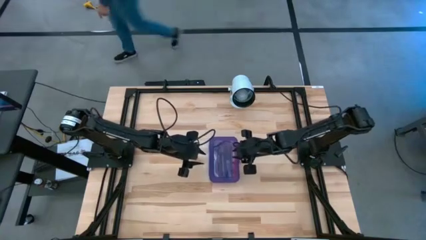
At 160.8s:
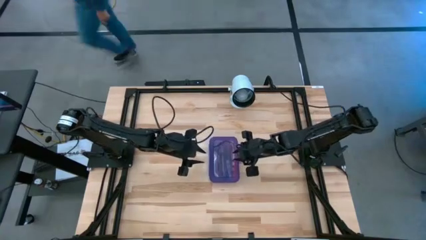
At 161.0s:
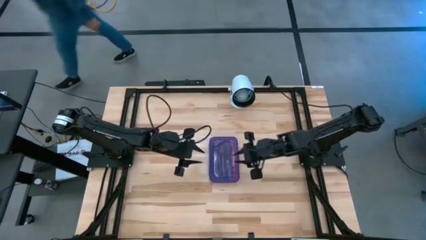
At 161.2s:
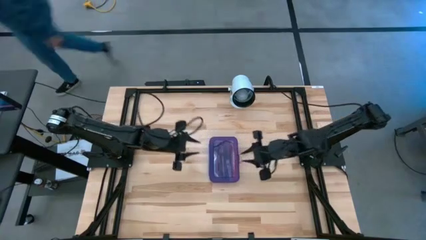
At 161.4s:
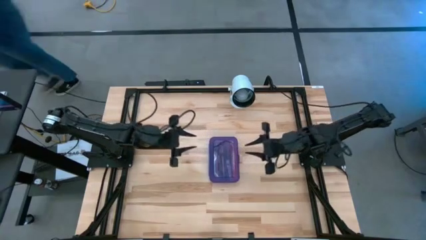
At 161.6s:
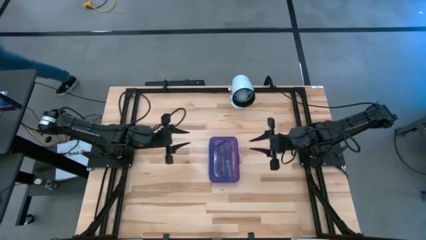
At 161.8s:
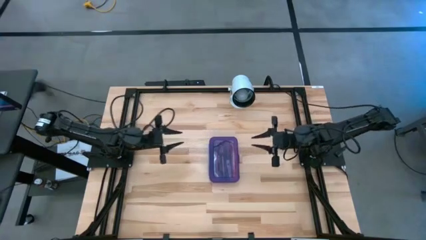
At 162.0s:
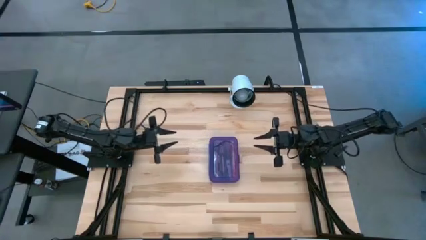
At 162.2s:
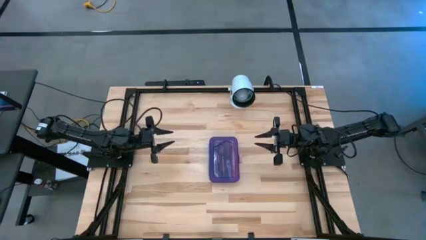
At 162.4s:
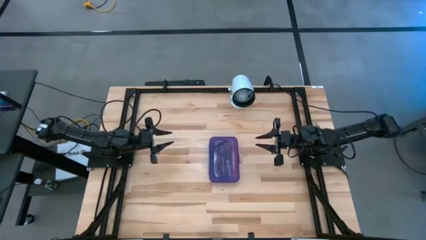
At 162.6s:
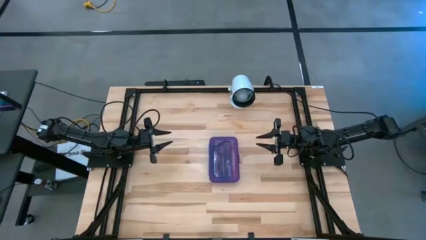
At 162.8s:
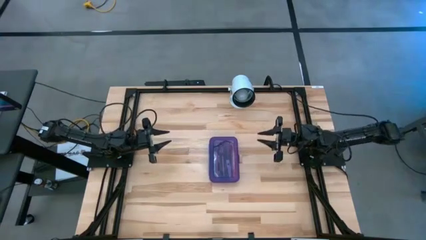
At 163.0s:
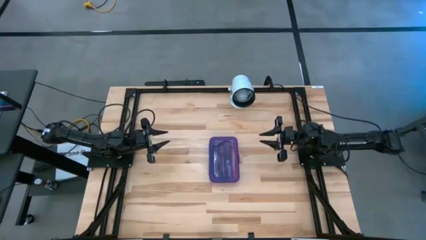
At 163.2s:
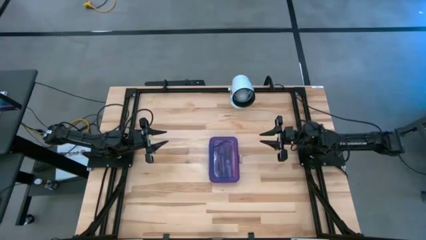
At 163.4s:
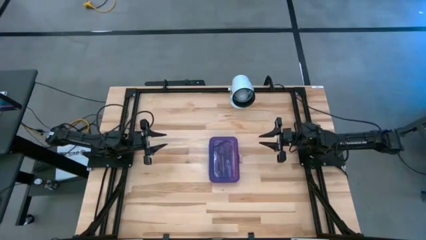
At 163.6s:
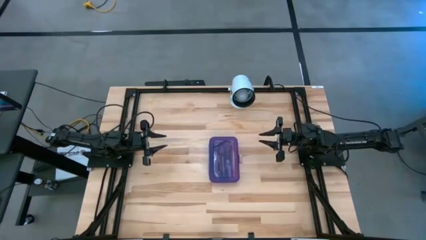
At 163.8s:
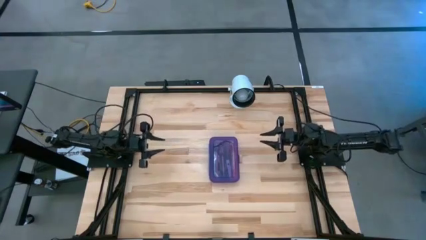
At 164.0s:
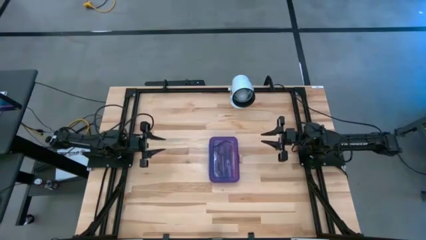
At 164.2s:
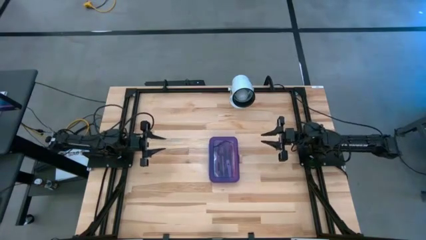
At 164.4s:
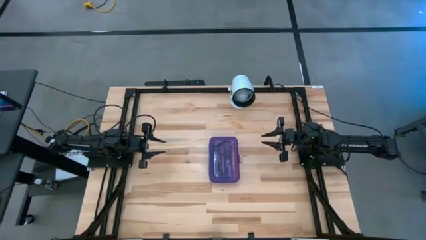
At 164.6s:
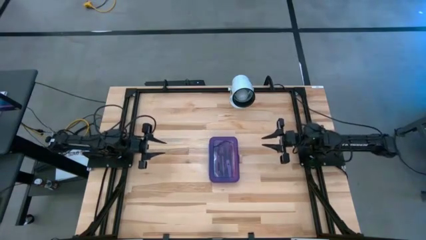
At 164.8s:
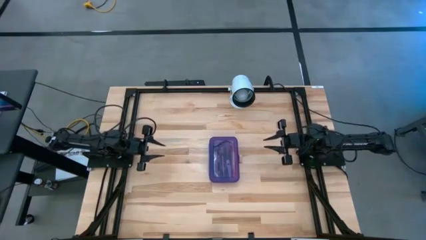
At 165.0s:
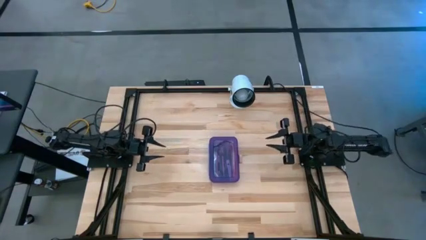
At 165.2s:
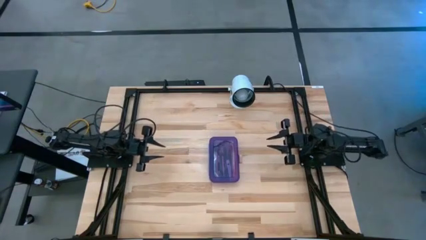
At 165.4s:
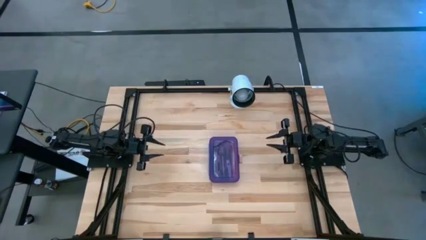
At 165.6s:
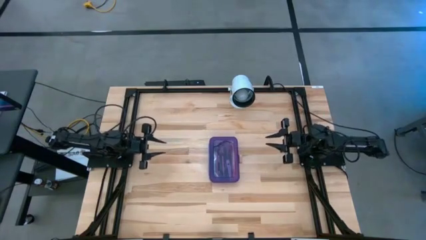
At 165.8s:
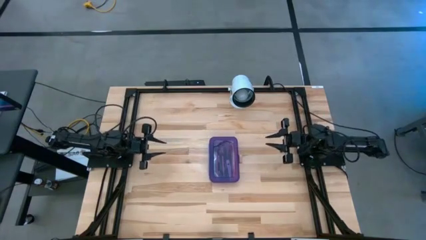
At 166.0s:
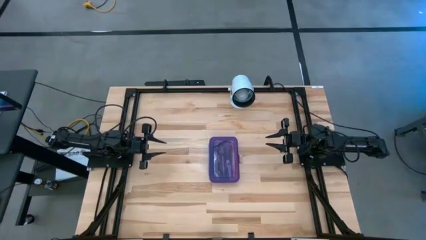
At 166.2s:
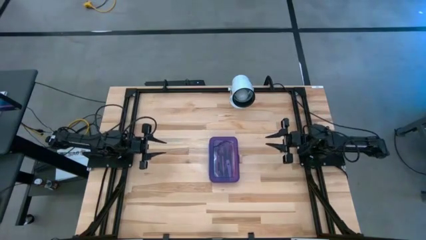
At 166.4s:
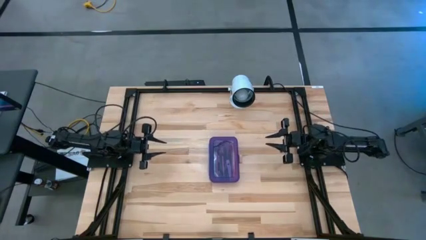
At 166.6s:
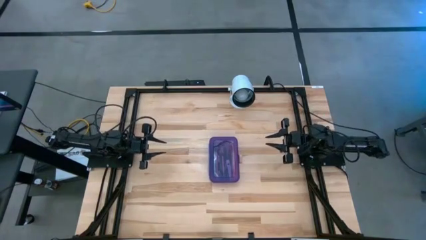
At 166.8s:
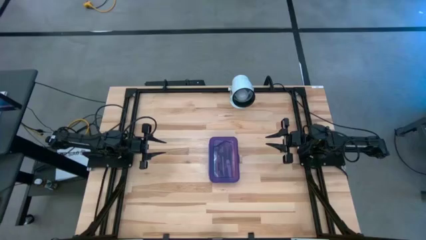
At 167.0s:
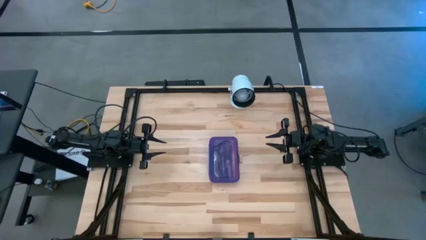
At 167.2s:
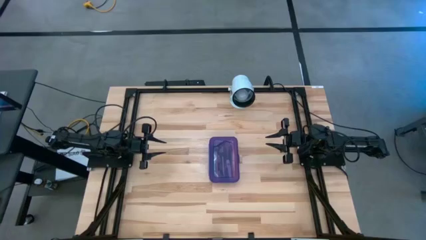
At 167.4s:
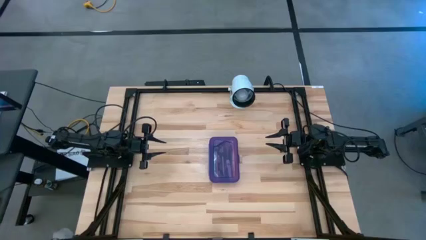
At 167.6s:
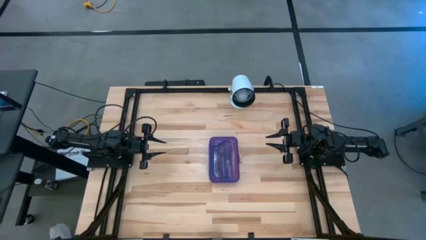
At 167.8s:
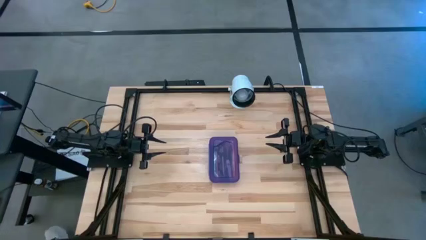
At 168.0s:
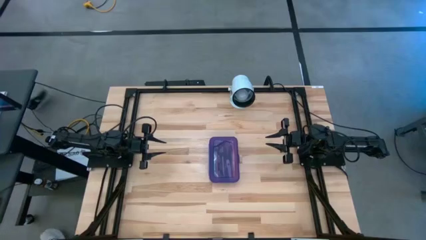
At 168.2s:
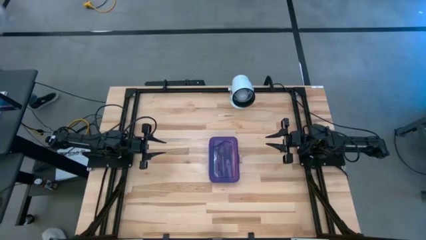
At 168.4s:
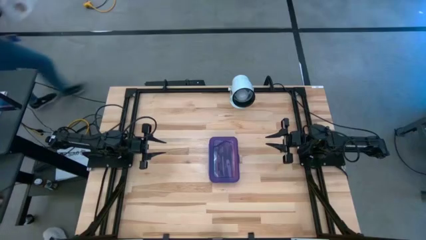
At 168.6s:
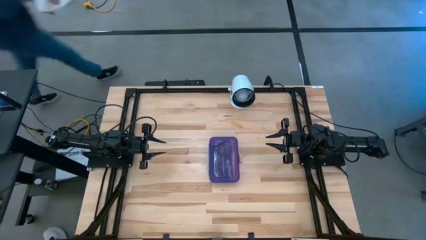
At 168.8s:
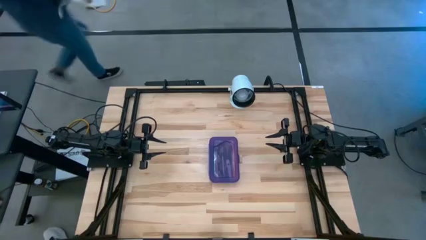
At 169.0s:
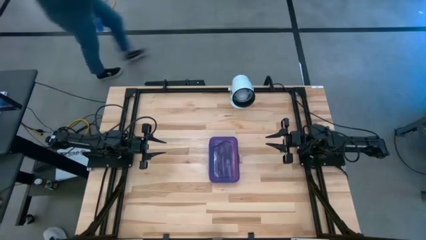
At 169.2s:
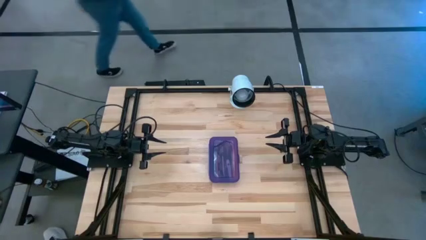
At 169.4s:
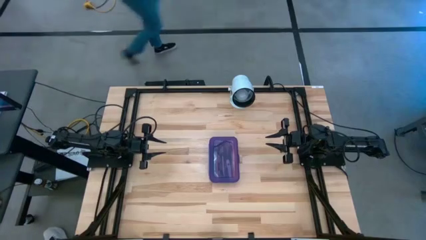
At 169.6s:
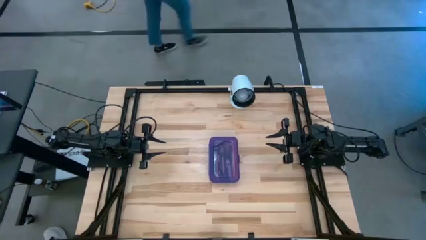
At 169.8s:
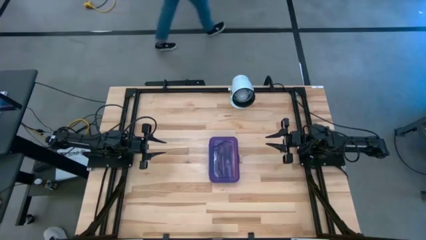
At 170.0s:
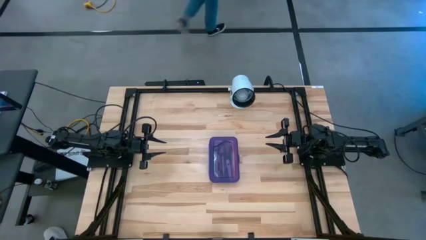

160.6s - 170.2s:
Task: Pick & place school supplies into a supply box
Return to Home Position

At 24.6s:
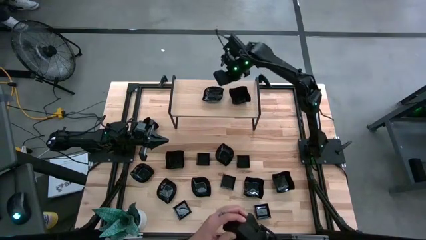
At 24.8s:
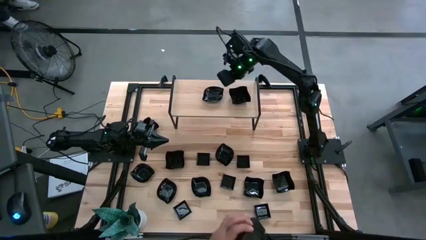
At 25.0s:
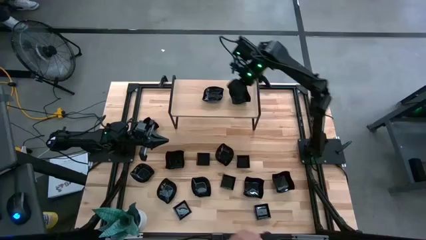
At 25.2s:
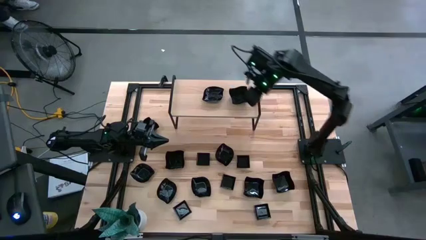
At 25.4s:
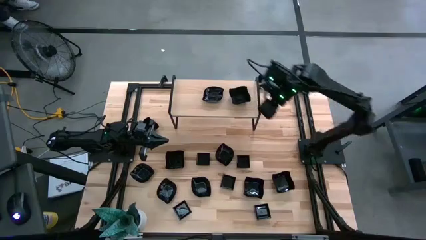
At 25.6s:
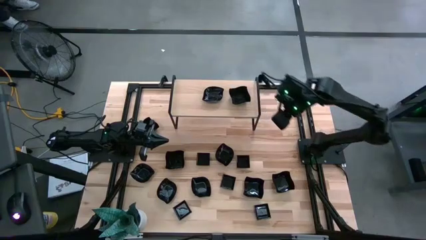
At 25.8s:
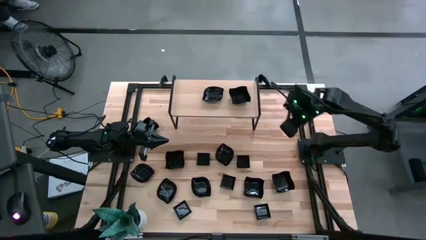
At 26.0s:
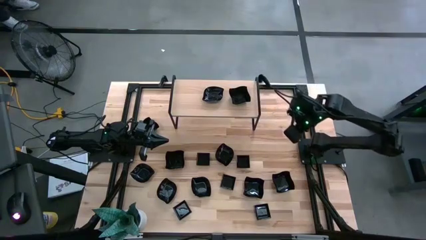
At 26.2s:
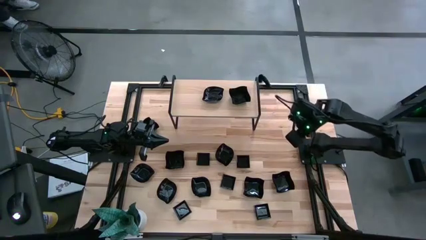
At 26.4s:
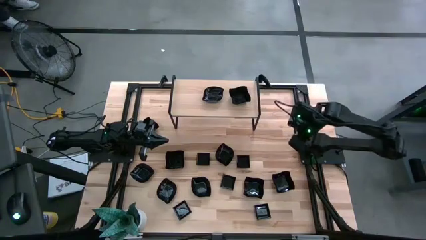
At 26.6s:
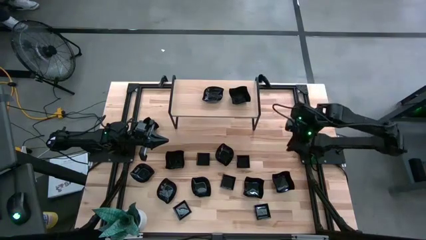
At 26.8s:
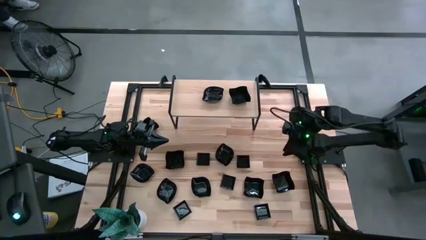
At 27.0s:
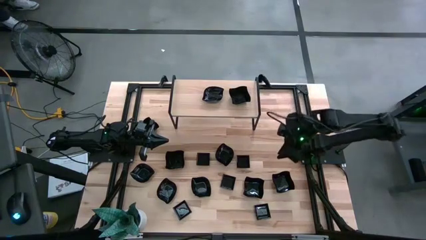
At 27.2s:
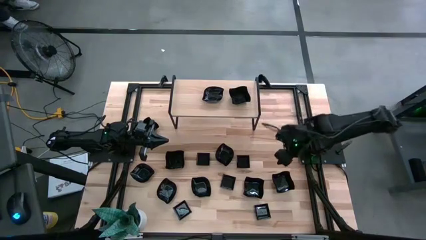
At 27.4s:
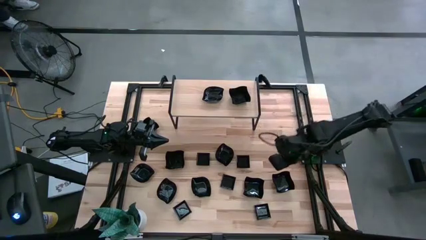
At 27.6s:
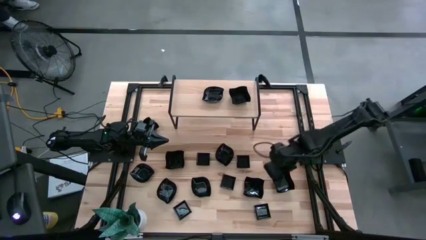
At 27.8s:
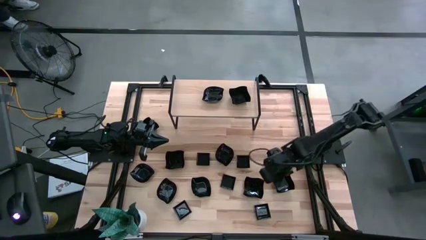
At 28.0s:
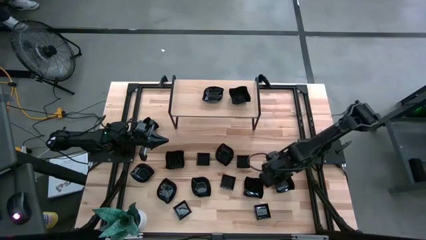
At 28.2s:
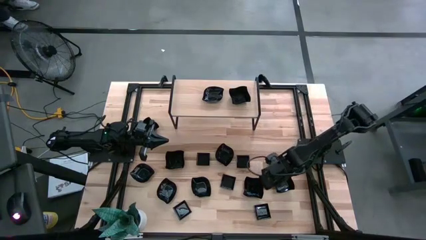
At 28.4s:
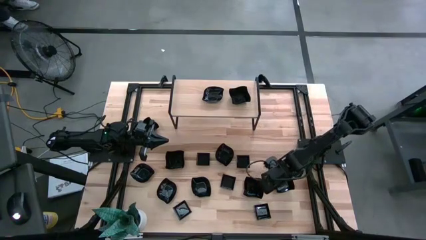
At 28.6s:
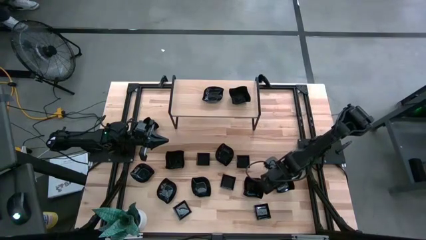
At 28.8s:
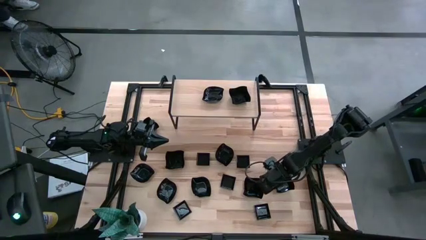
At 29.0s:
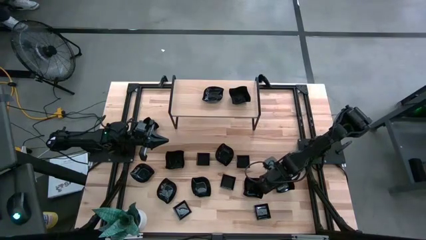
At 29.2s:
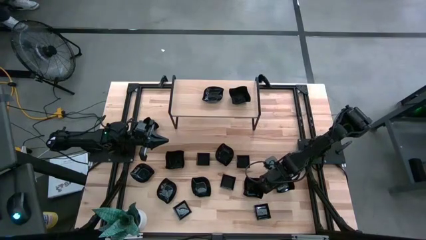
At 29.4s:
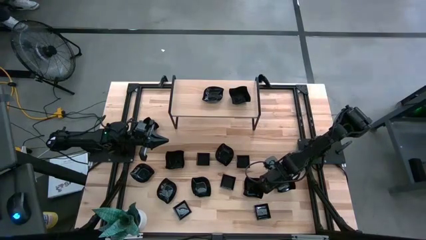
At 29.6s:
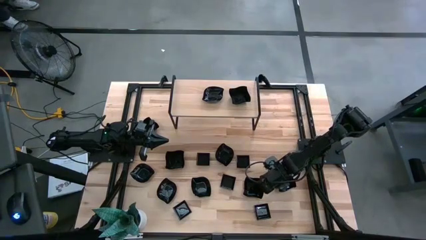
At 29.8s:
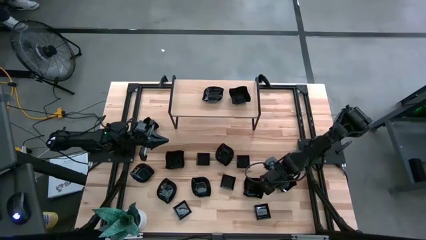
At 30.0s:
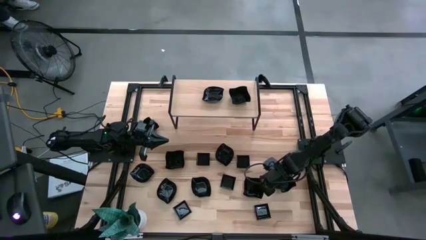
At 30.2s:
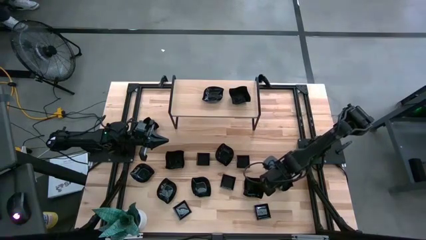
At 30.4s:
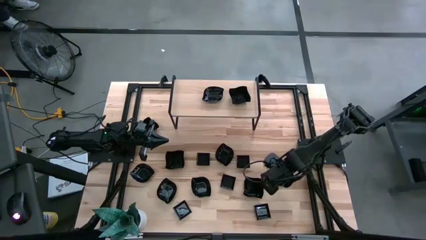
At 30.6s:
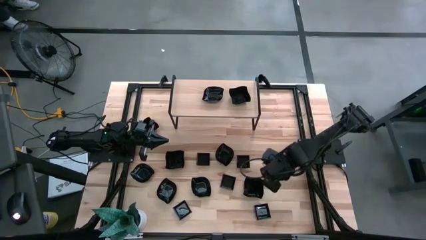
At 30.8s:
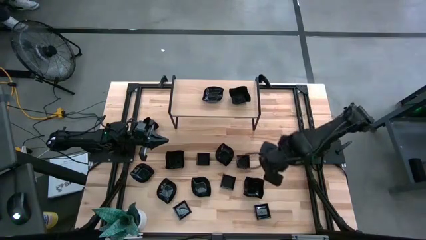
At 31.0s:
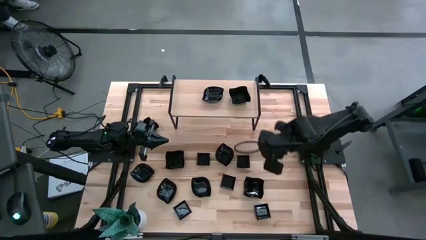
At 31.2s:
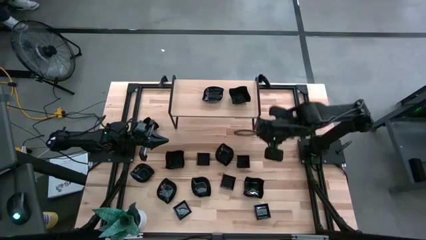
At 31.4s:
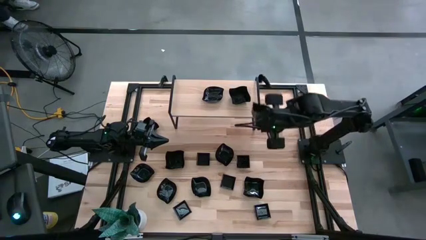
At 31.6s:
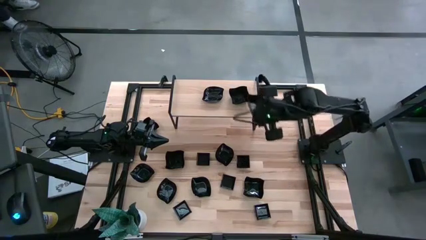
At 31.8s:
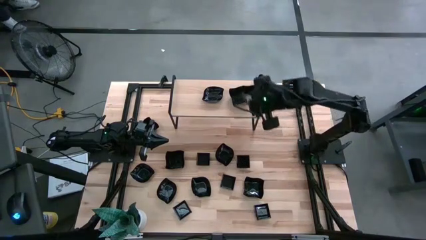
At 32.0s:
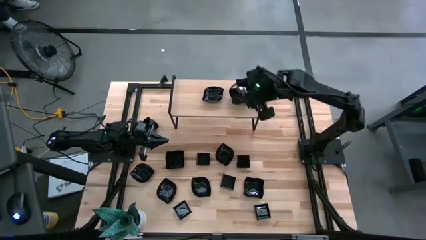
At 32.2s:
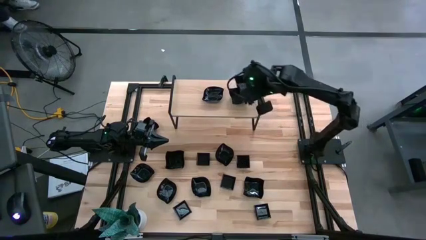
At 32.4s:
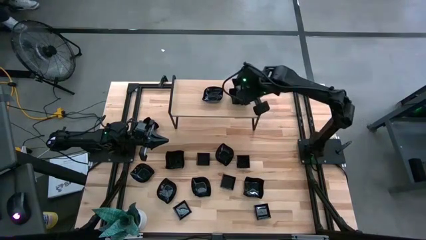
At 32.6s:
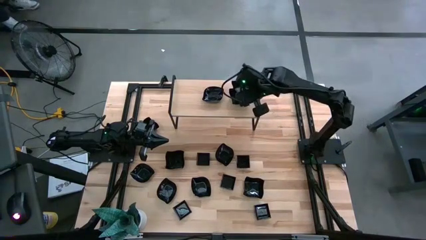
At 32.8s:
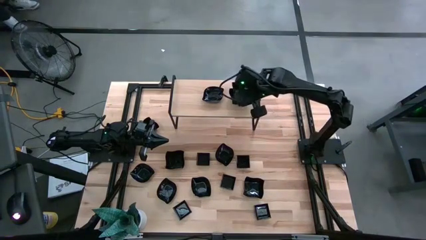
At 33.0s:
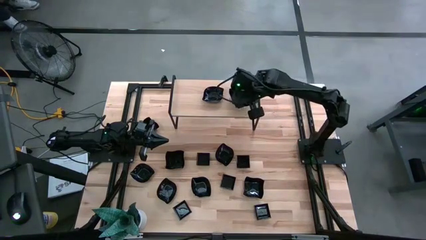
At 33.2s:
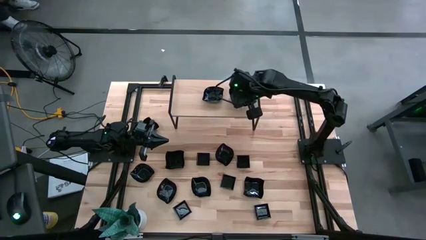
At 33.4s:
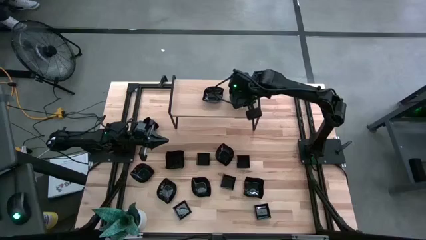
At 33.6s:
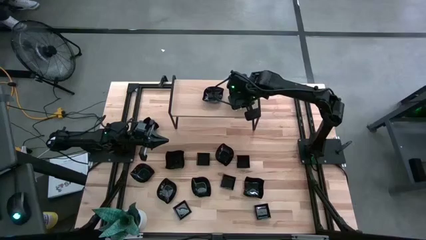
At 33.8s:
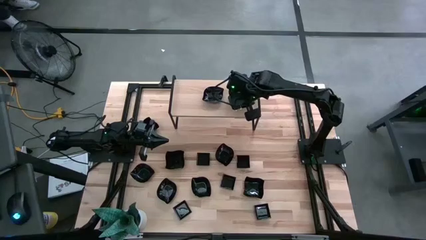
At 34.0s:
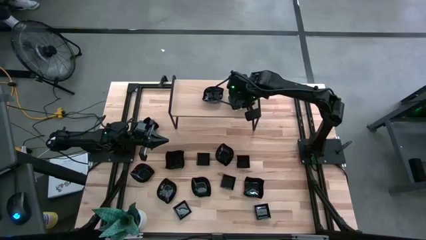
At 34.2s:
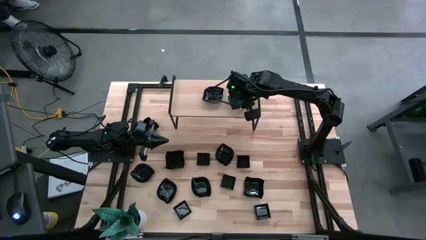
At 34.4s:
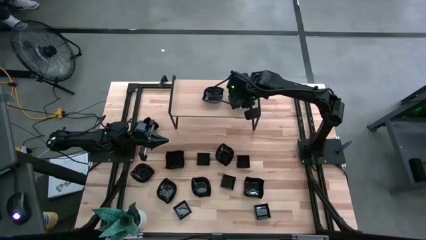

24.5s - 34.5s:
Task: Pick & Place Mini shaped plates
Stack the distorted square-shaped plate on the distorted square-shaped plate
